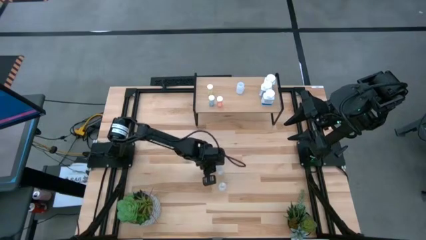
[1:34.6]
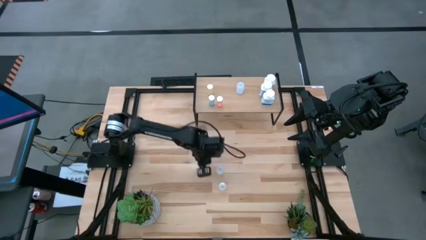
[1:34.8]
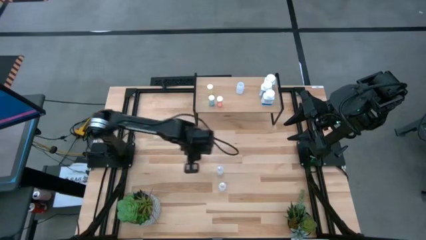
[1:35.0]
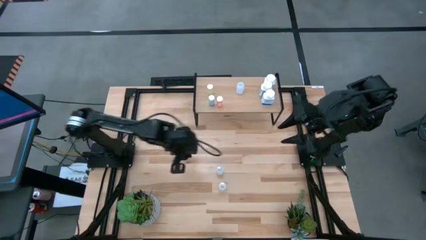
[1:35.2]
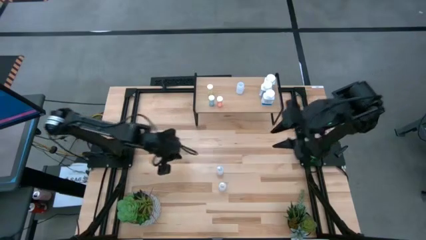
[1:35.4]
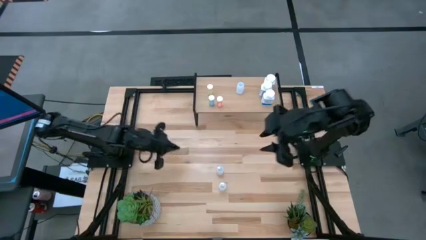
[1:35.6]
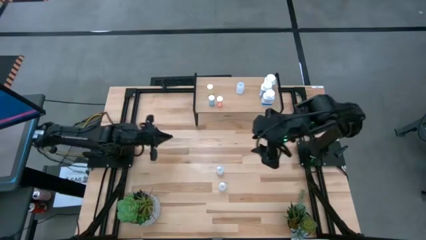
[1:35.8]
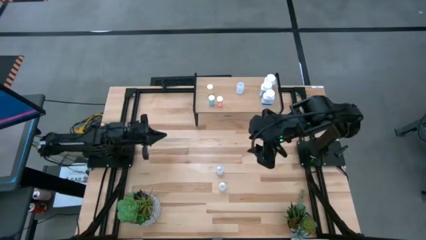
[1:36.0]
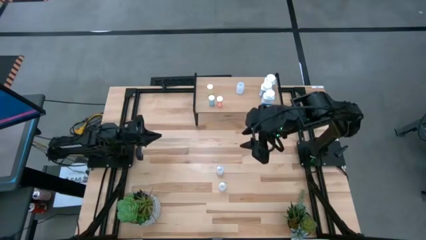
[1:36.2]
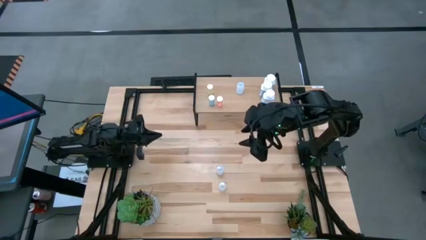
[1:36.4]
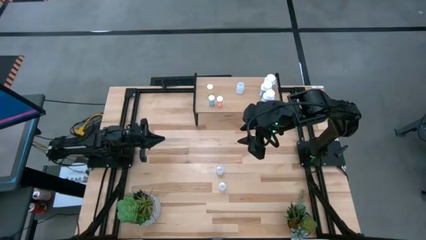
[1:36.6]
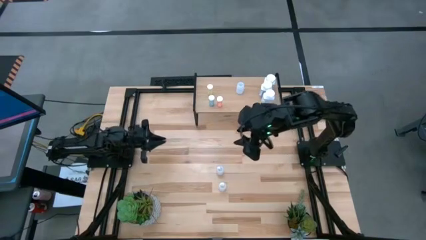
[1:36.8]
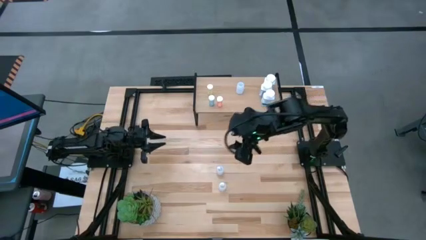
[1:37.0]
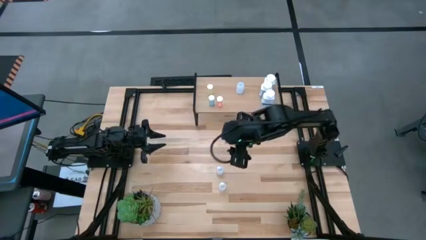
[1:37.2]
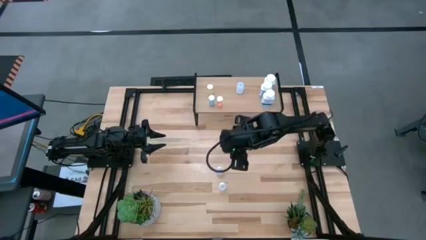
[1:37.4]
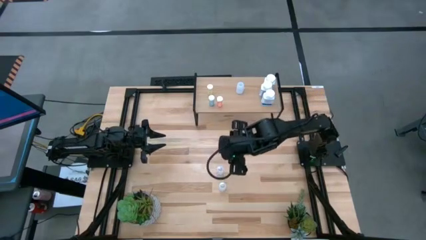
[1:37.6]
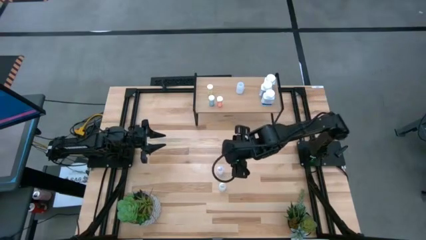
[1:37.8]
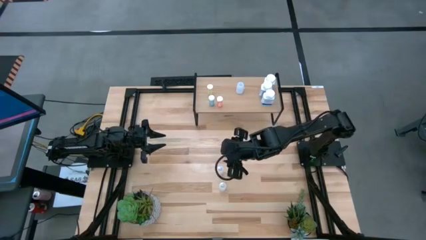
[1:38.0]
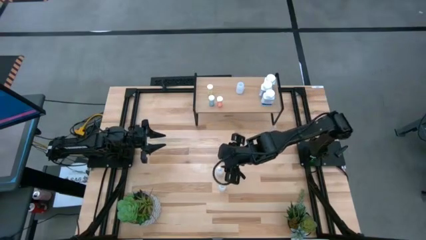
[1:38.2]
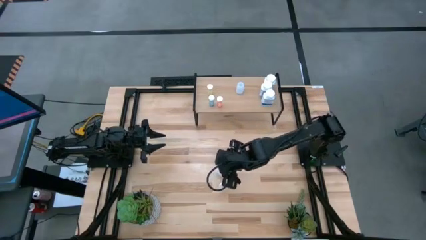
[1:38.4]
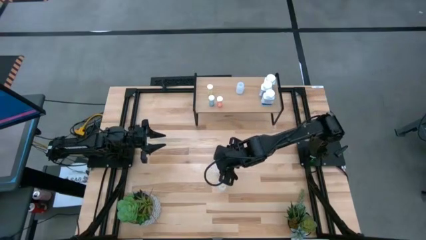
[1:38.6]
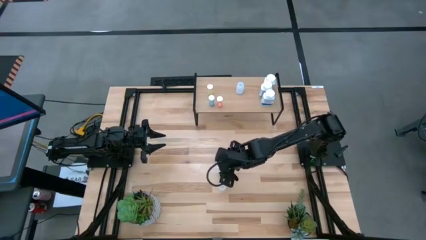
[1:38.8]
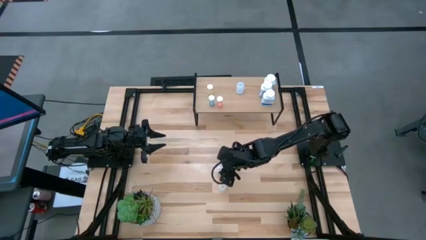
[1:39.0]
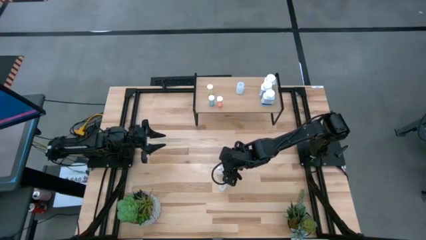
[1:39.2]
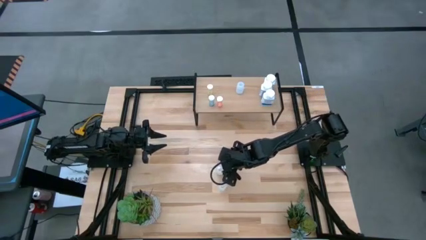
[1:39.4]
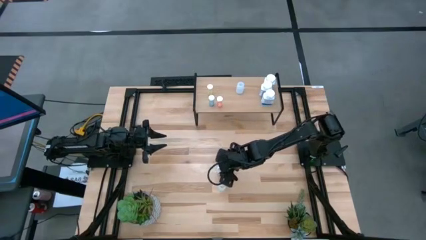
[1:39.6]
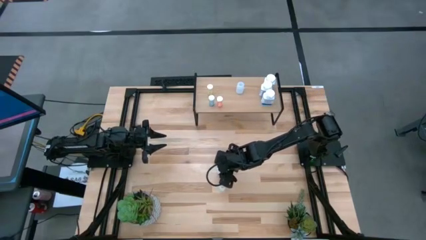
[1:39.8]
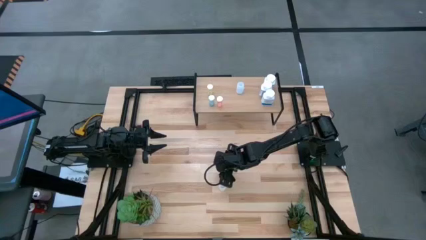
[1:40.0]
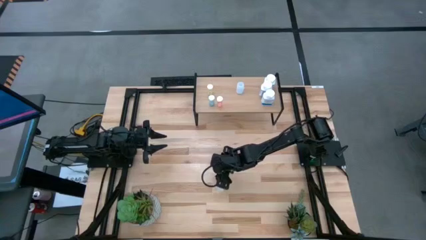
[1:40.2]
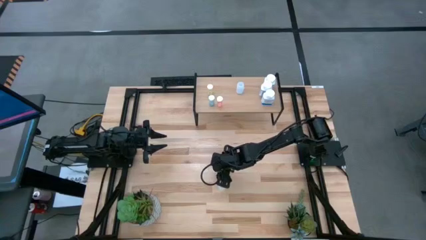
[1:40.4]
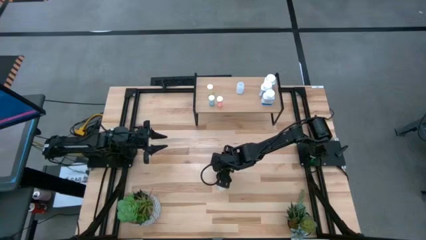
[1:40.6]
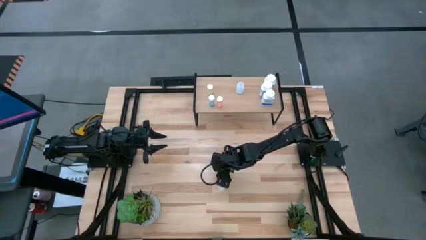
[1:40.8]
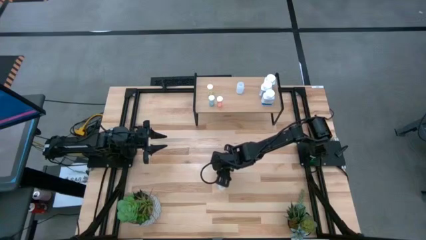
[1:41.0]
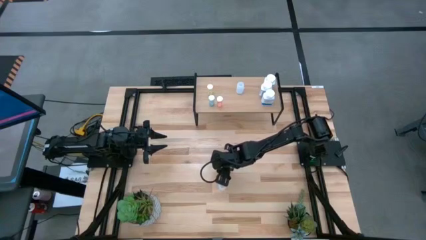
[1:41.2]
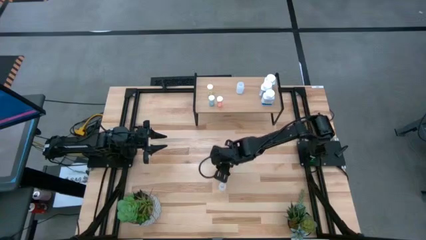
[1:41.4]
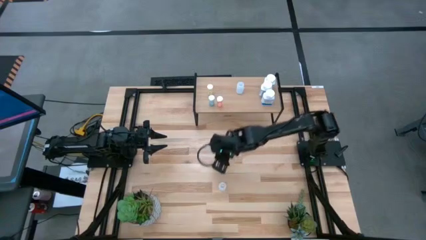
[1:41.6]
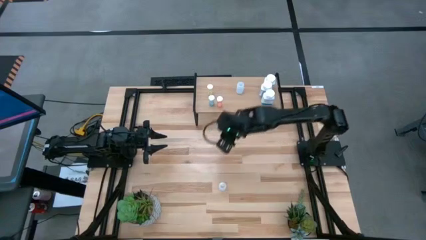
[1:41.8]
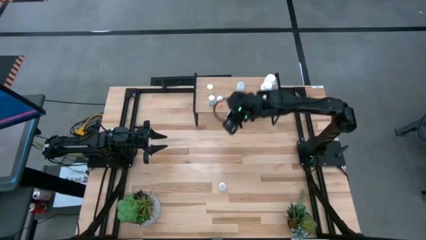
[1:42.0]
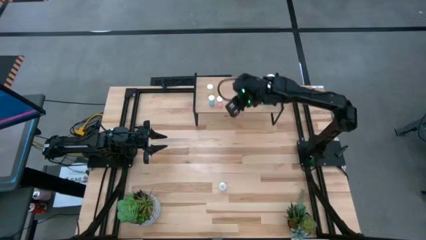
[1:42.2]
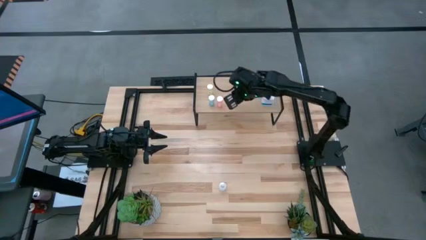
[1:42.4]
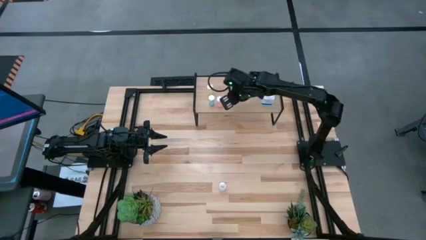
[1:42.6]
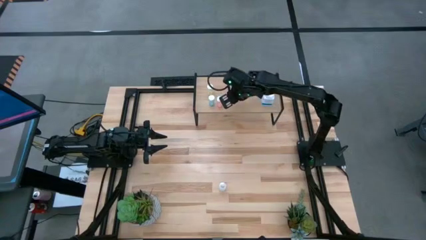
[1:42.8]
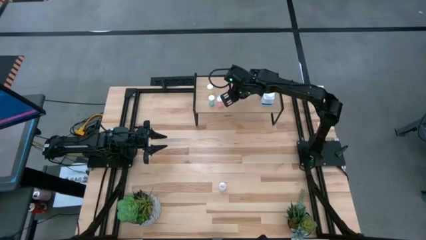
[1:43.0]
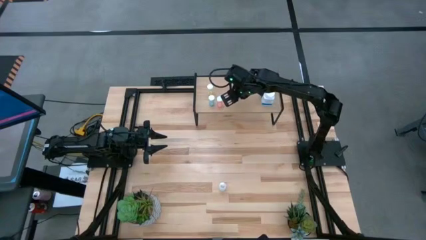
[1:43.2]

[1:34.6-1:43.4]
Task: Pick and place medicine bottles onto shelf by color
Put the top transparent pill bottle on the shelf

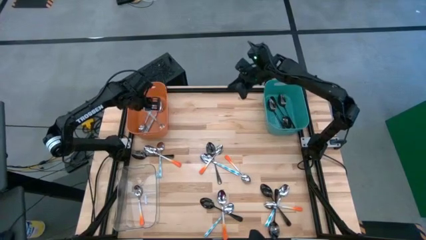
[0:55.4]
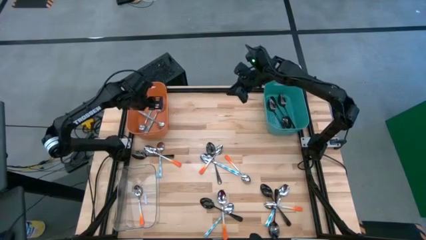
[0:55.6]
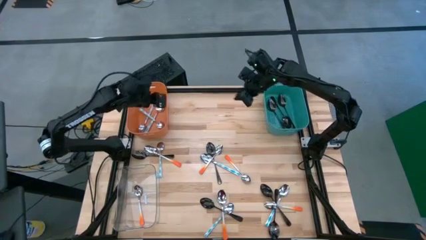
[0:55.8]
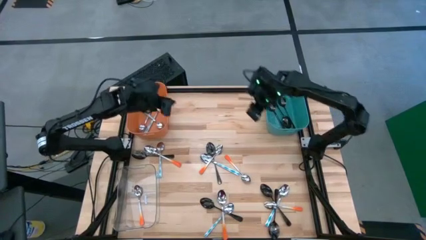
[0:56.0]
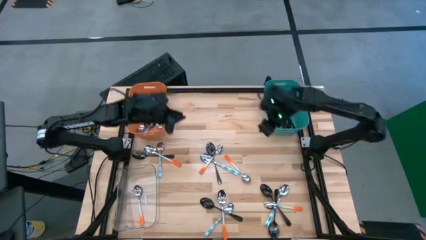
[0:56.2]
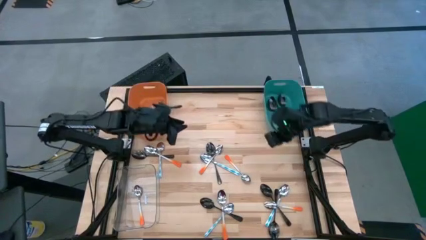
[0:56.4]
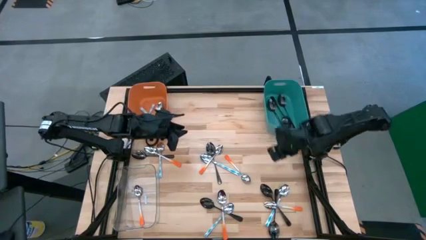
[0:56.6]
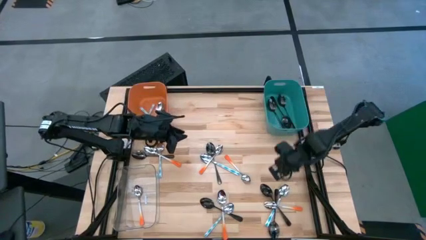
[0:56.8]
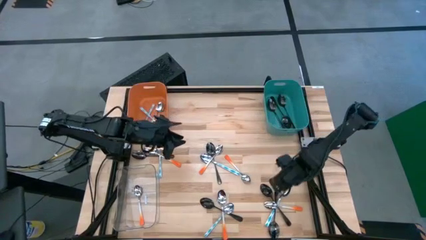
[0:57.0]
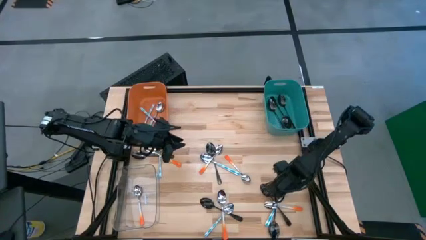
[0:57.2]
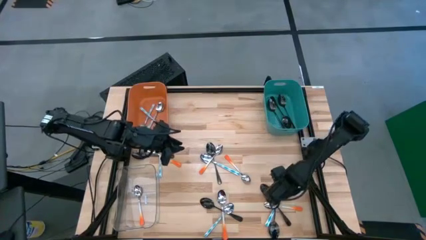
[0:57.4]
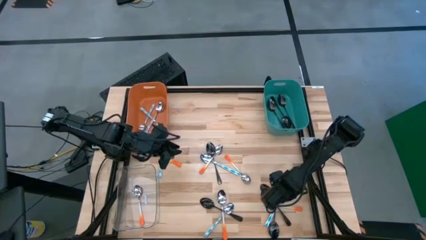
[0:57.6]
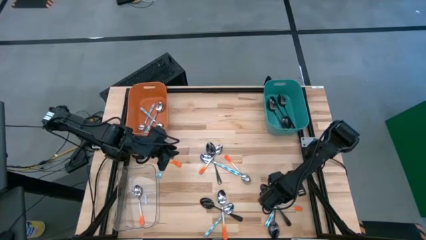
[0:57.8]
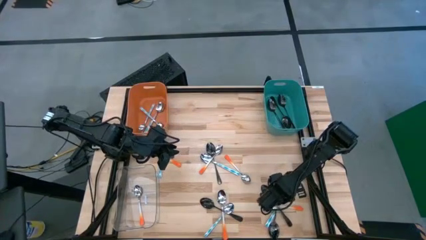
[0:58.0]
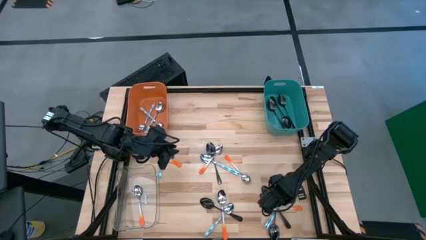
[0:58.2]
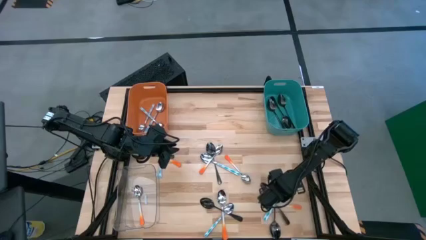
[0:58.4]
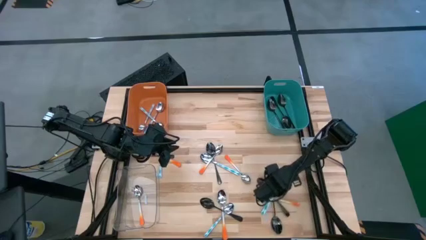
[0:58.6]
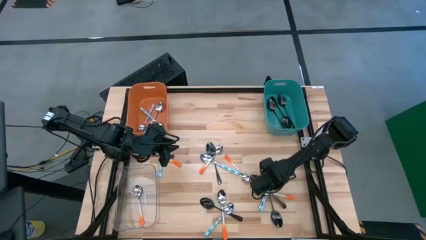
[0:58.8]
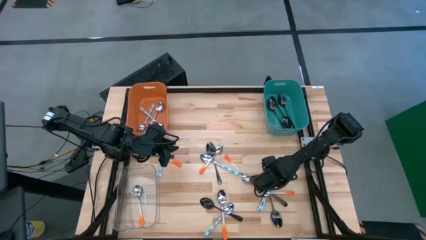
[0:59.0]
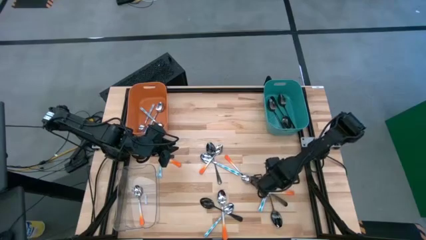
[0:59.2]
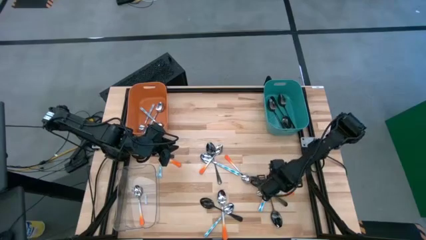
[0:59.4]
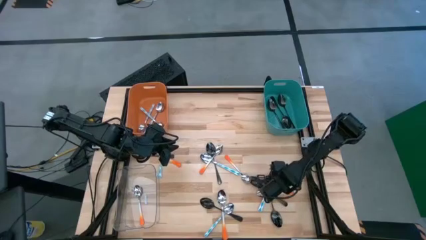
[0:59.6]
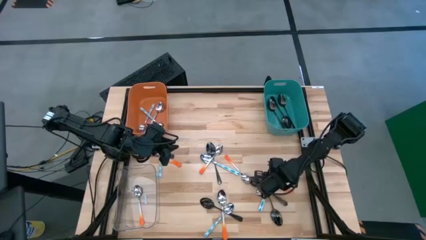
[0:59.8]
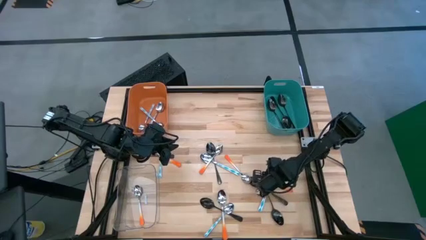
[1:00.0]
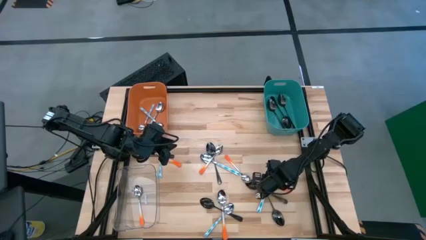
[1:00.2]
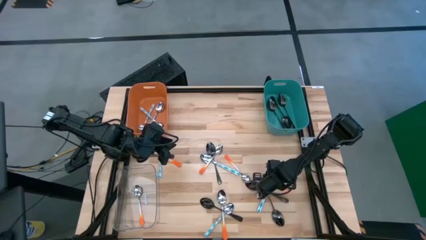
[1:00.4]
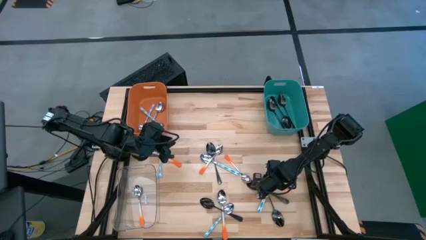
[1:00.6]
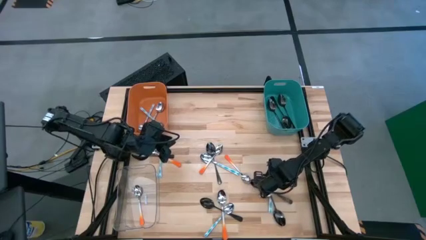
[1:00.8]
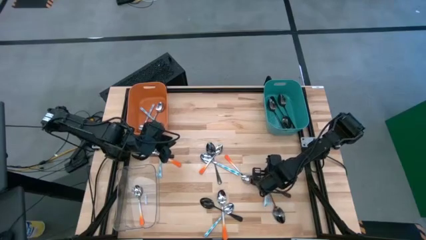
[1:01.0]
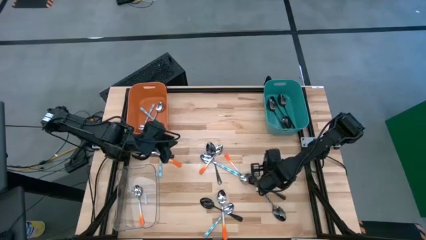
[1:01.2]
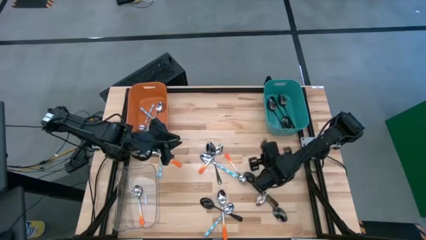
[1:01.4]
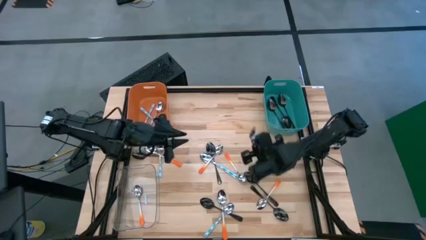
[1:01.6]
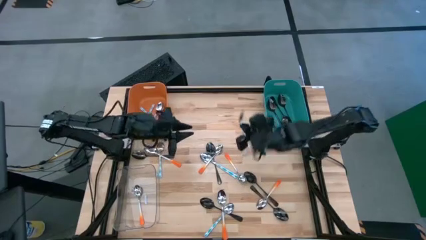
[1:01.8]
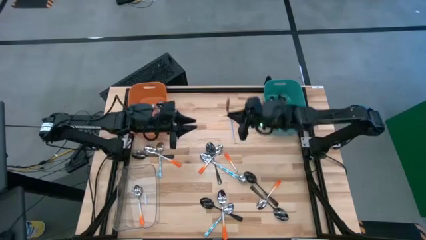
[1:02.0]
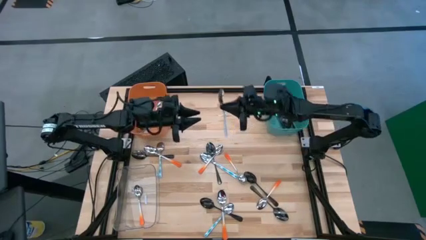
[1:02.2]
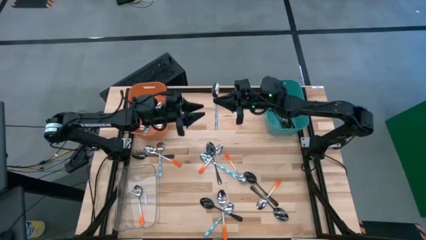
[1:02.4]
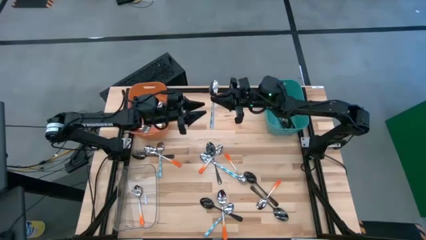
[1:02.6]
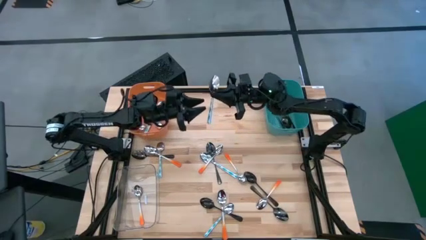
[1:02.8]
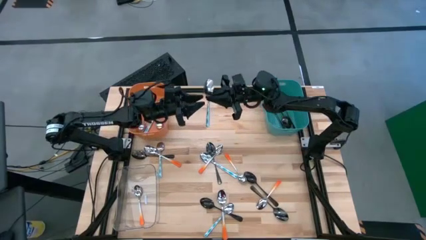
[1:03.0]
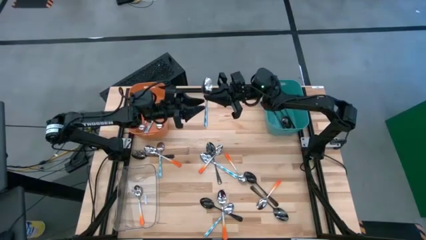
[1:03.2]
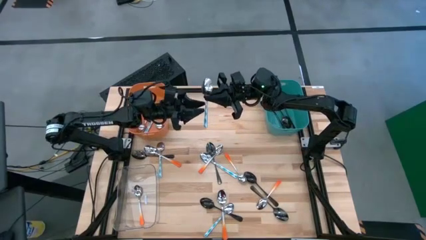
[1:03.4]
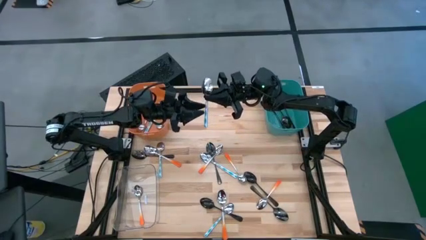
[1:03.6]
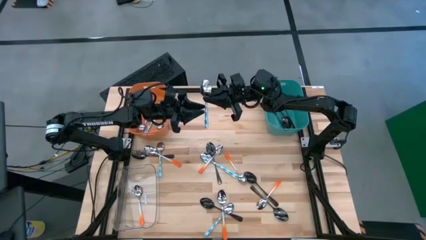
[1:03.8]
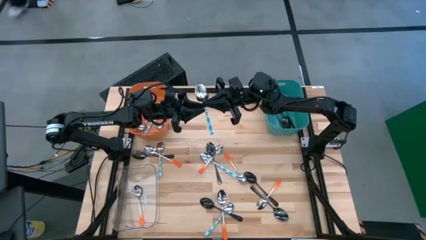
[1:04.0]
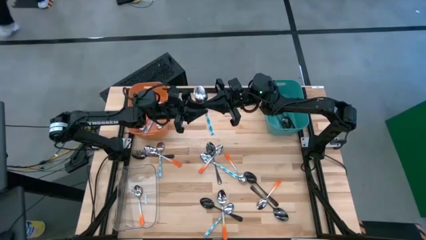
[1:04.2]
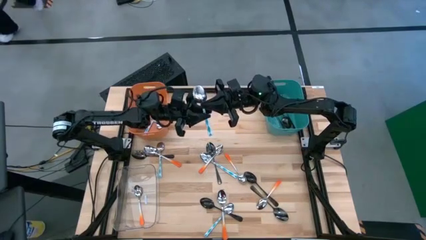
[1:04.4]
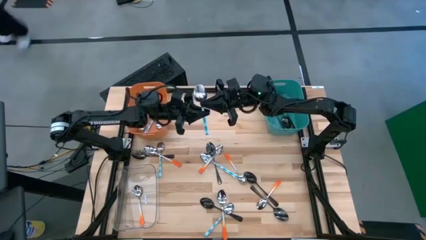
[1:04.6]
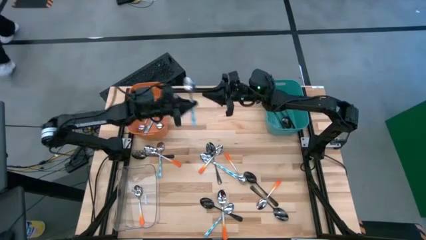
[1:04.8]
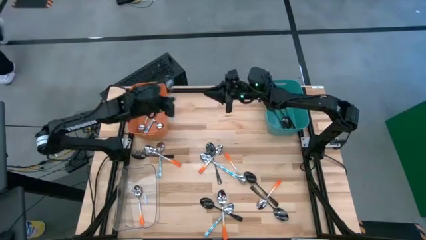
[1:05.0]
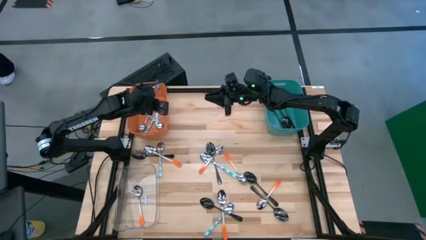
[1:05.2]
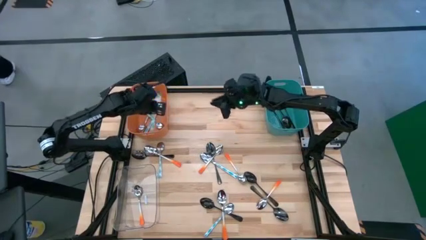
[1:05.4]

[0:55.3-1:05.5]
Task: Sort silverware by color (type)
Put the white blue spoon into the orange bin
